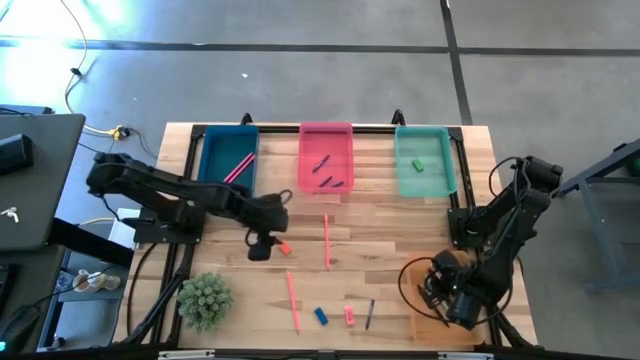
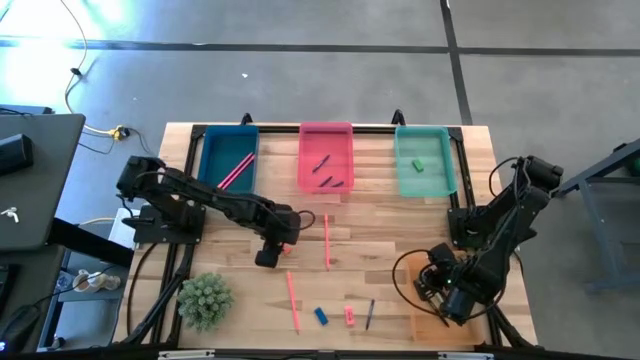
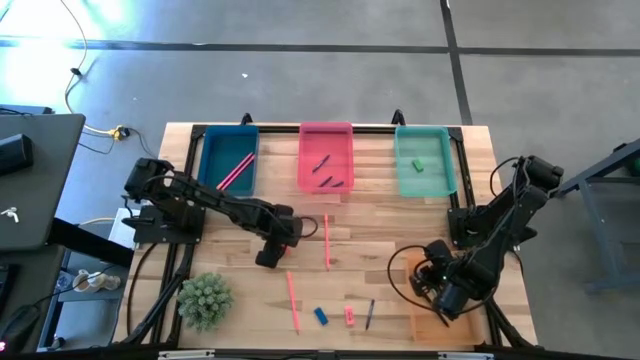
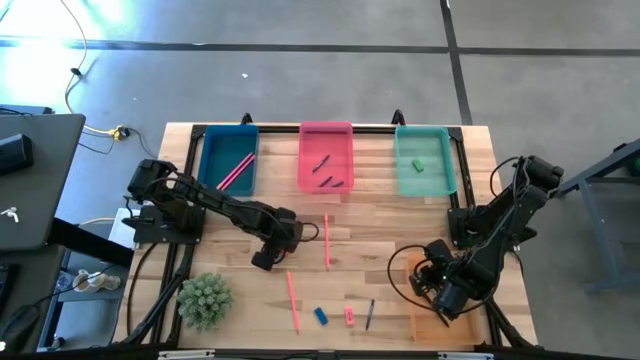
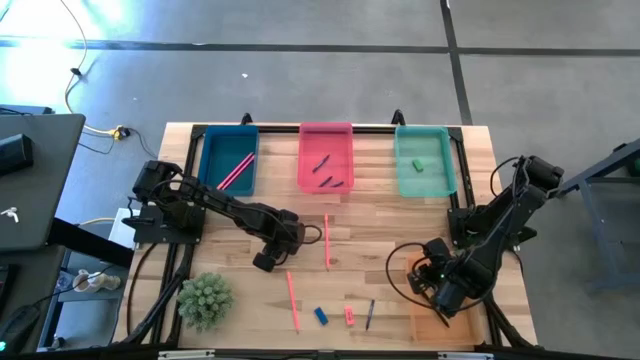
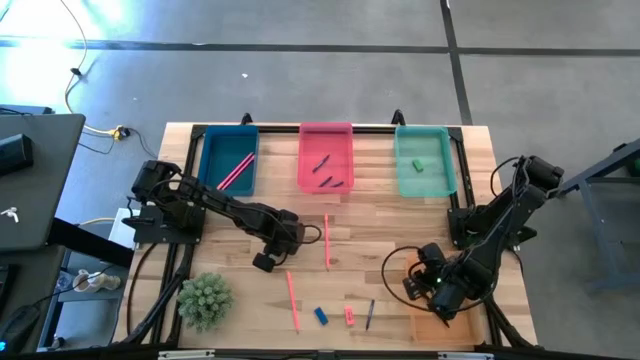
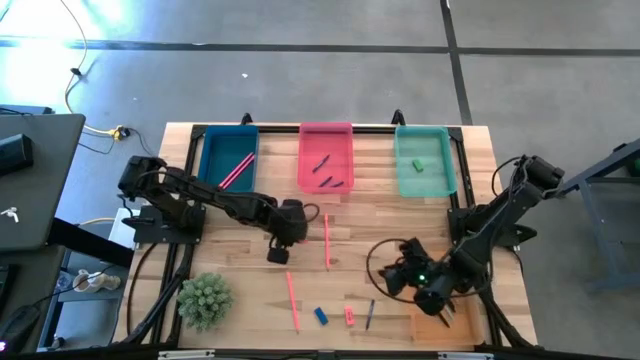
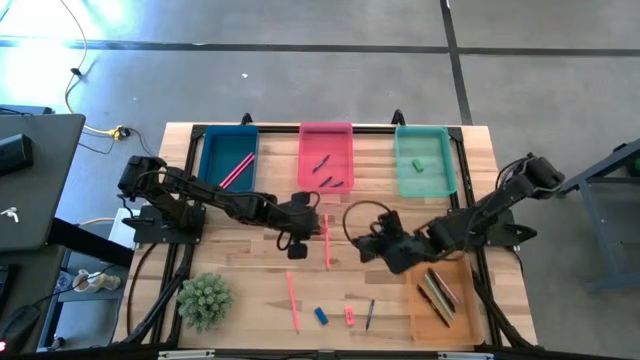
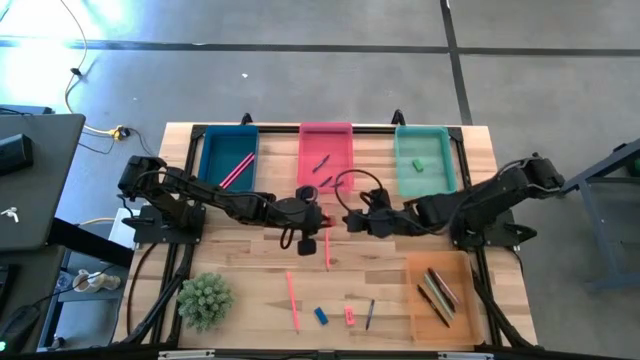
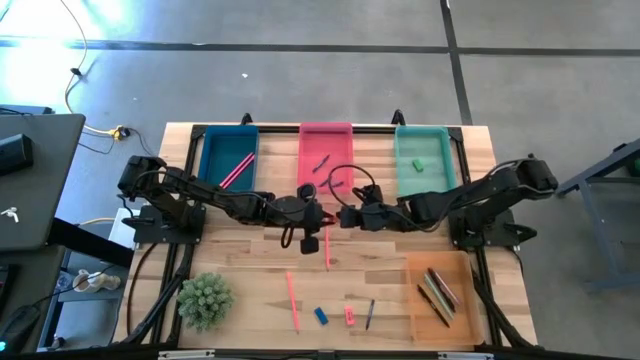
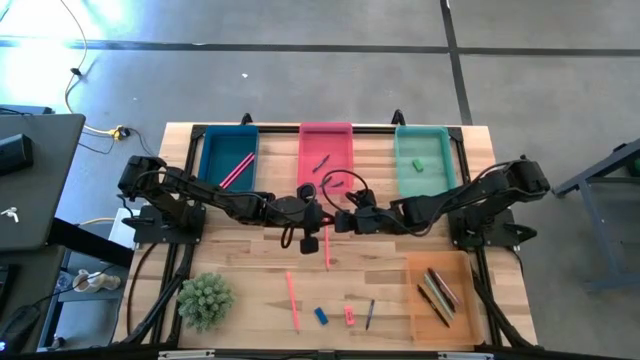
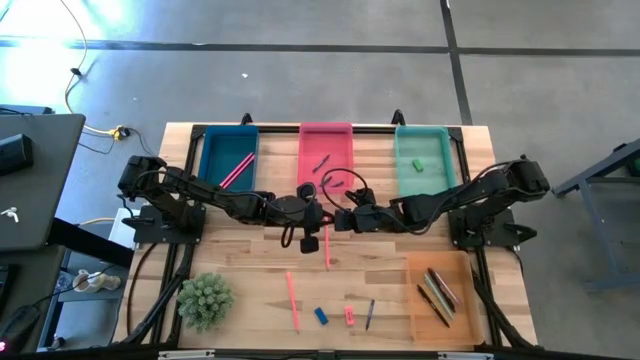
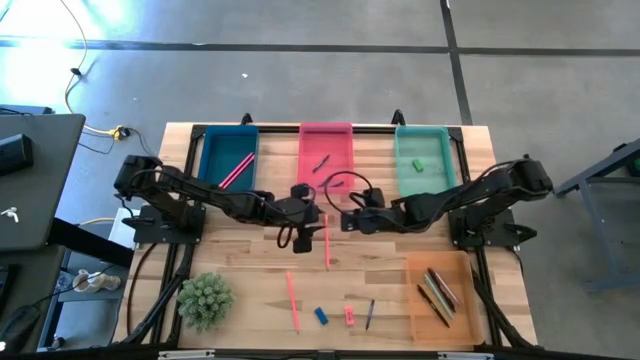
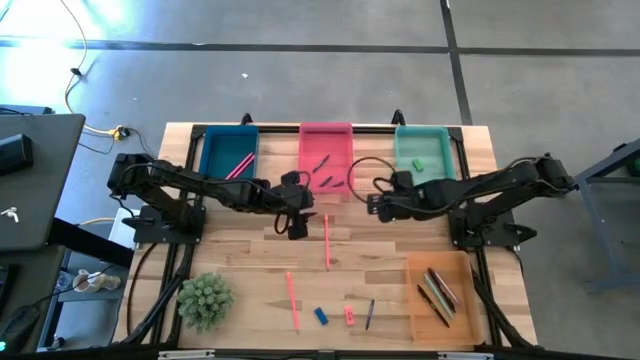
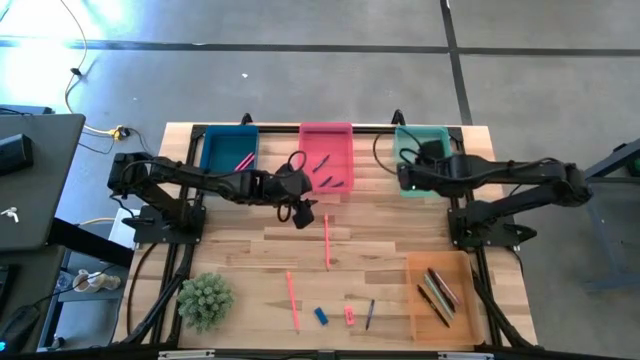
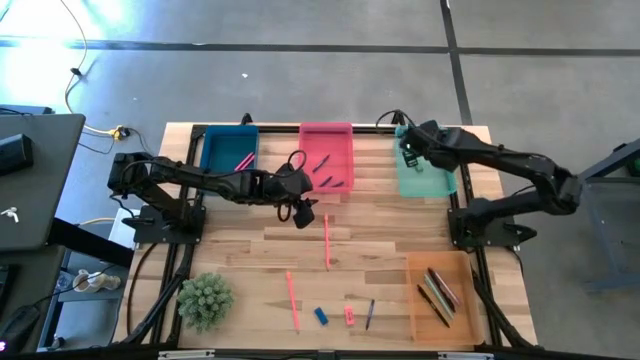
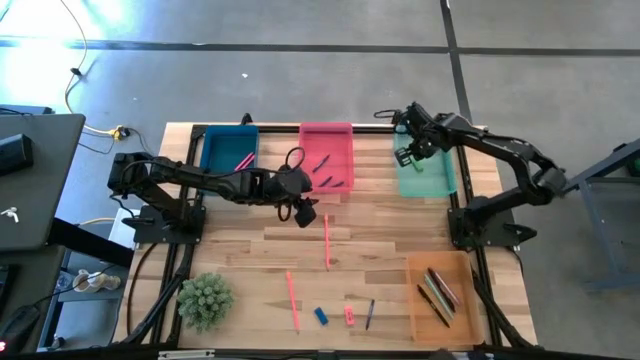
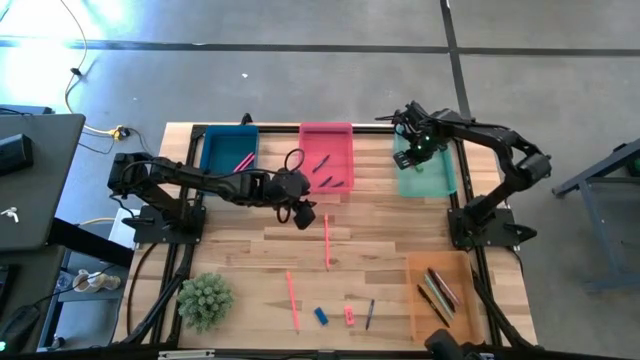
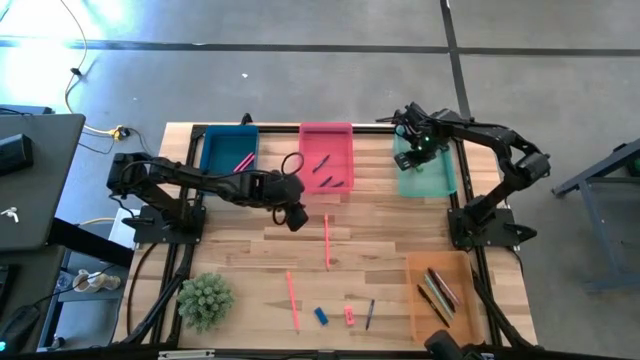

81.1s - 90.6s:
Task: Sort crayons/erasers/pens/pencils in bins
Put the orange eraser into the green bin

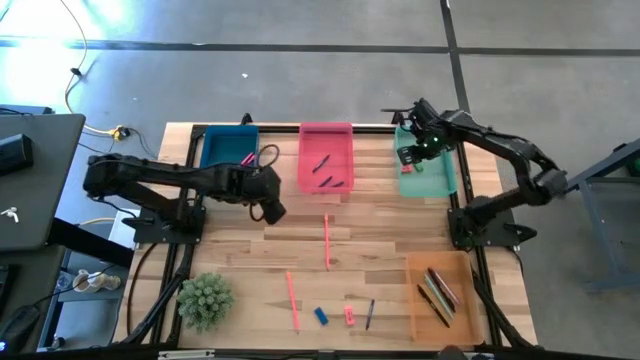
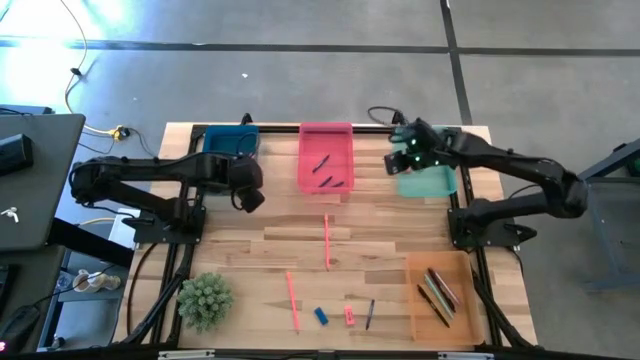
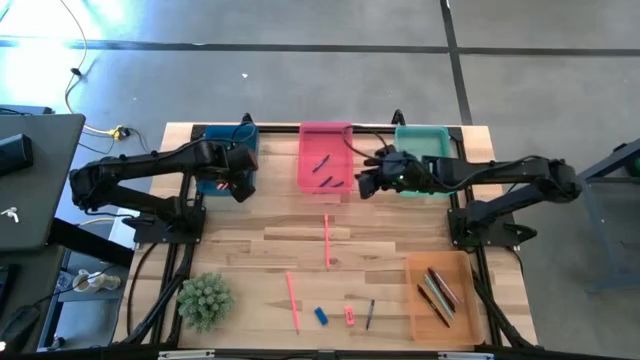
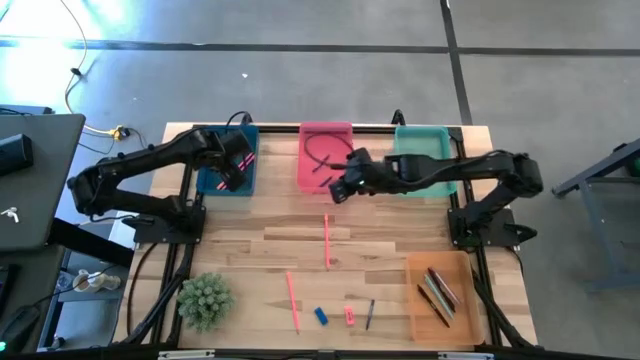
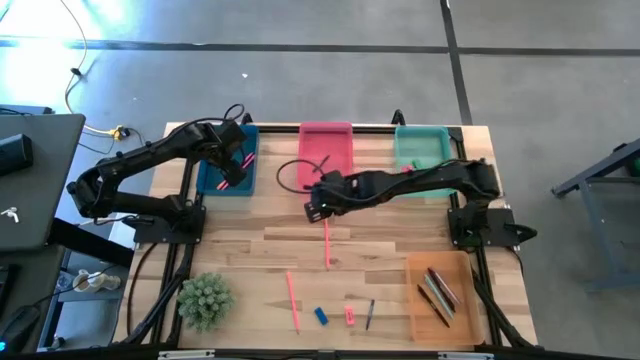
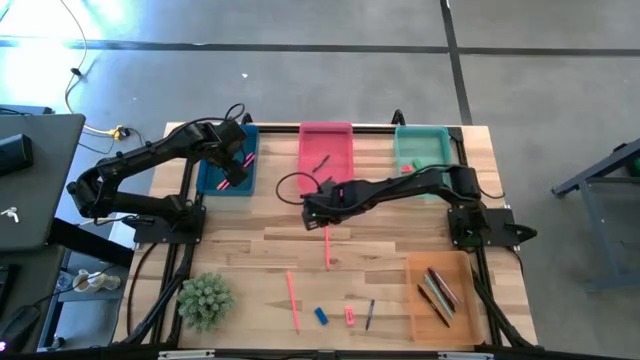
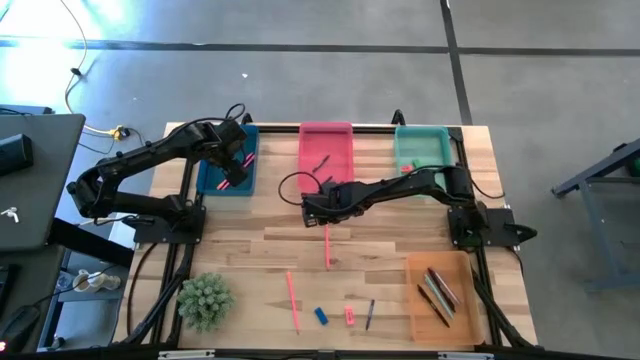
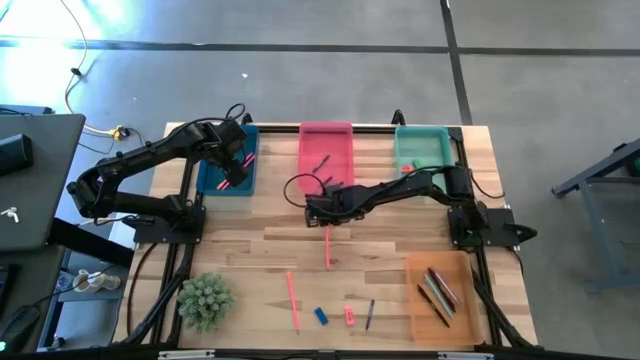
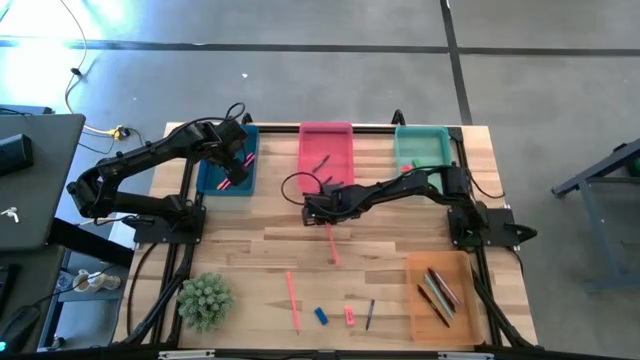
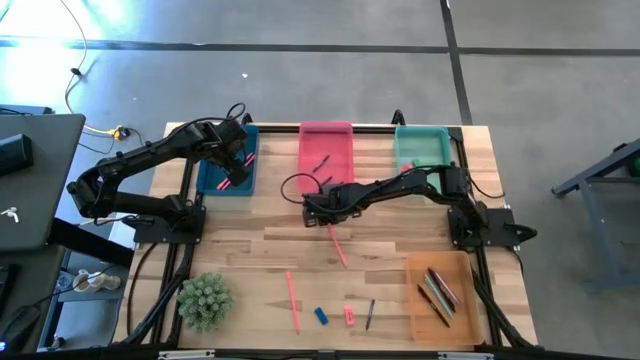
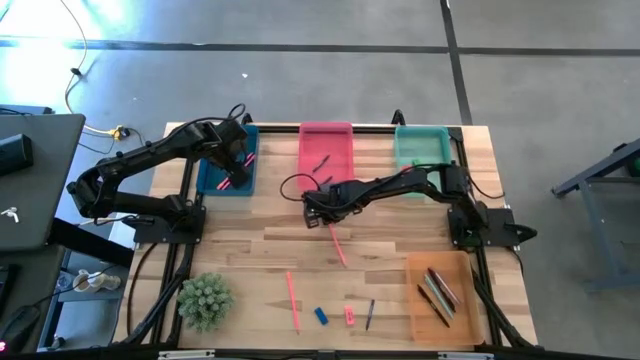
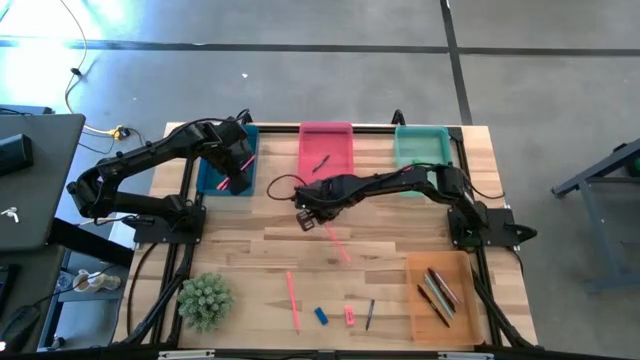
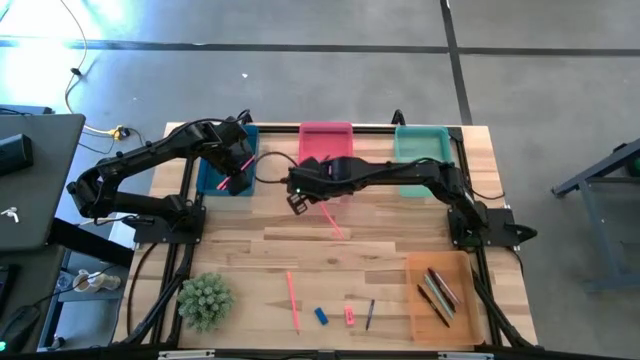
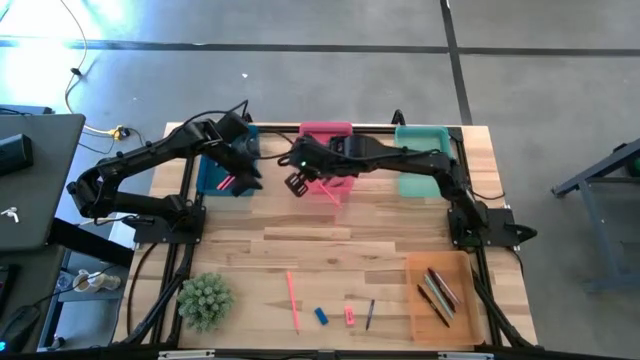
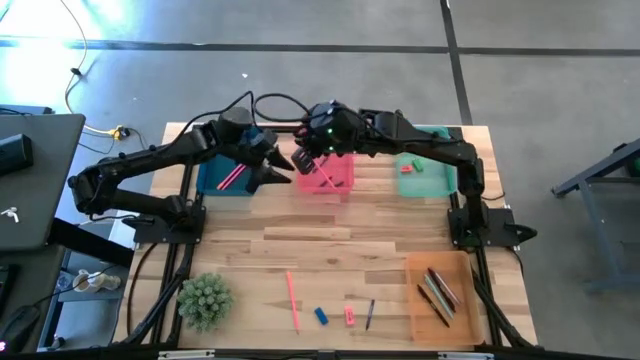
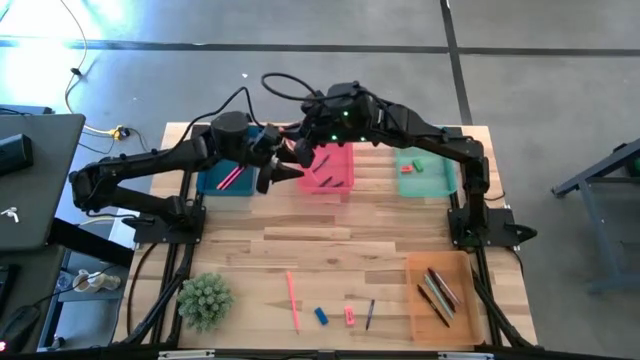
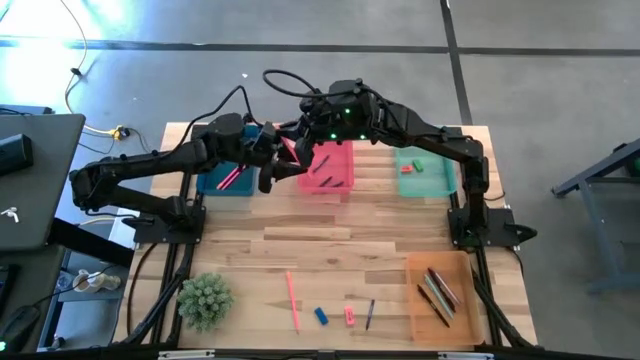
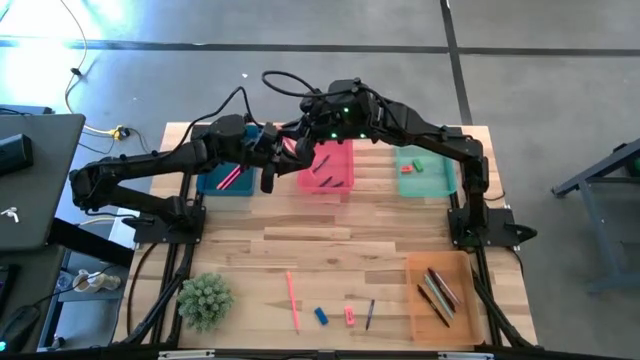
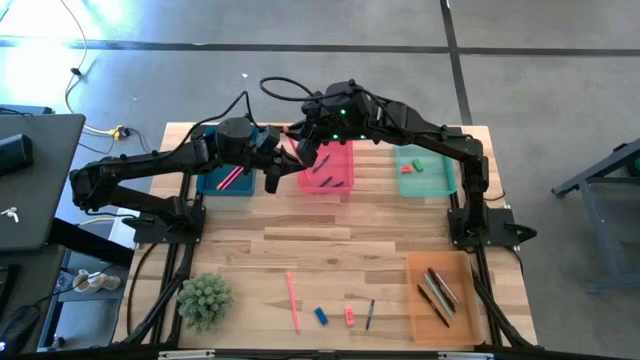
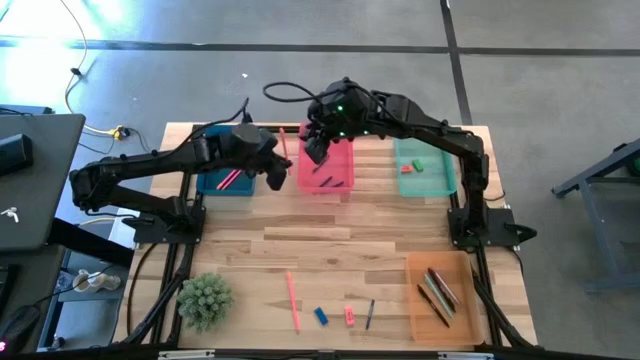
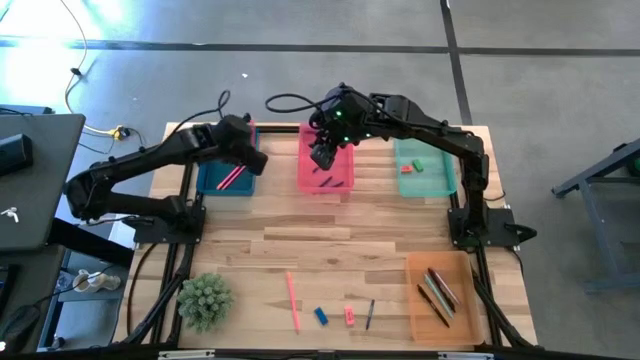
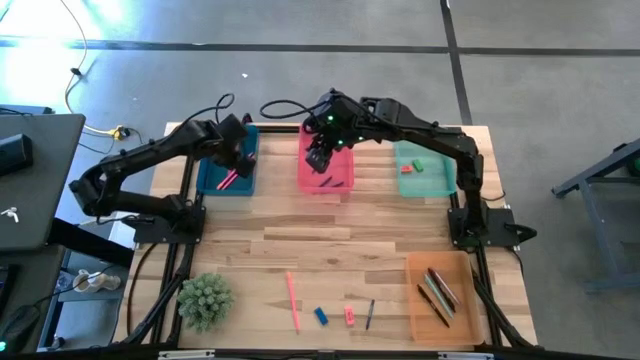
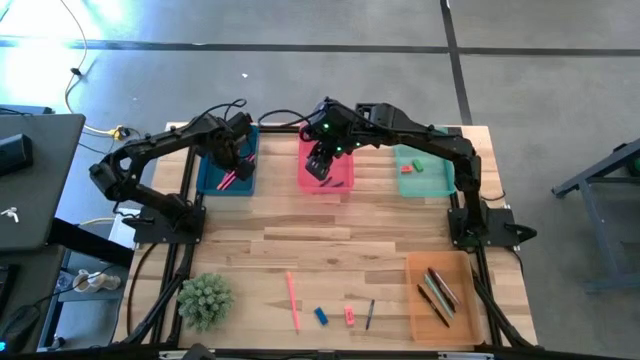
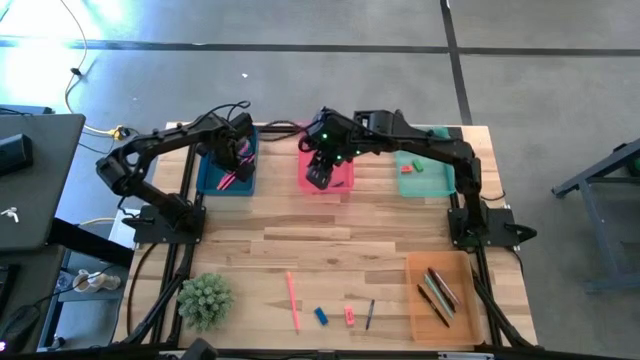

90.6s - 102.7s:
Put the pink pencil into the blue bin
